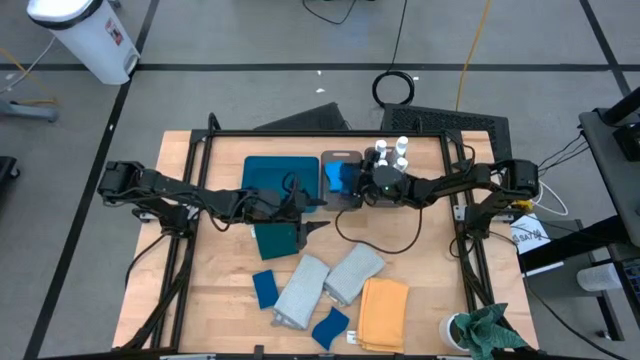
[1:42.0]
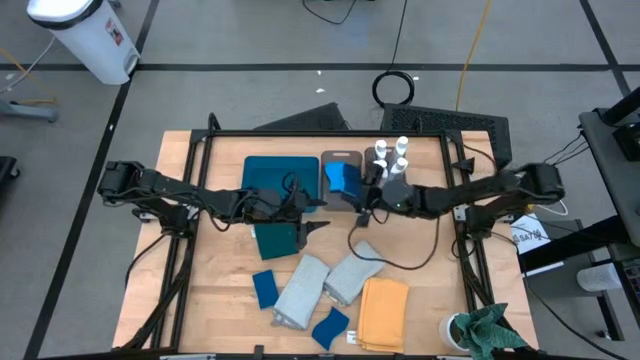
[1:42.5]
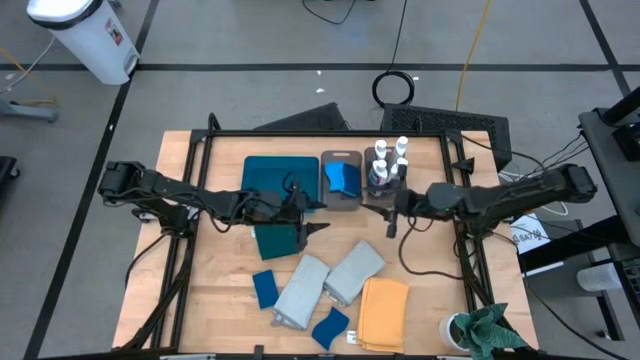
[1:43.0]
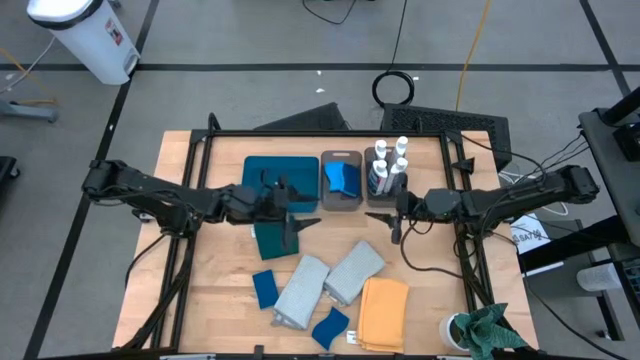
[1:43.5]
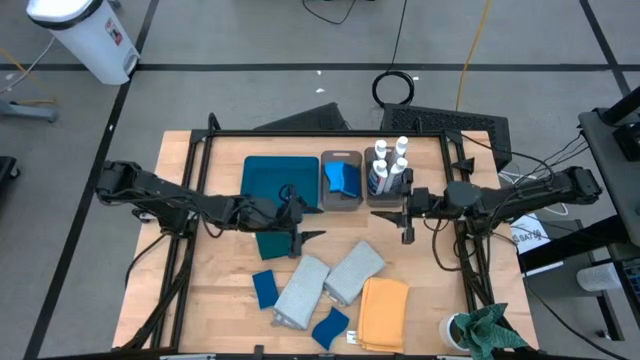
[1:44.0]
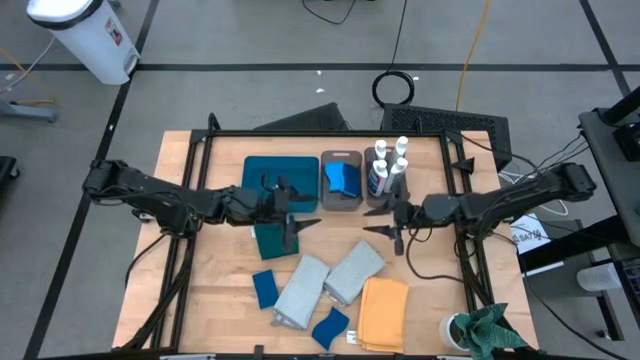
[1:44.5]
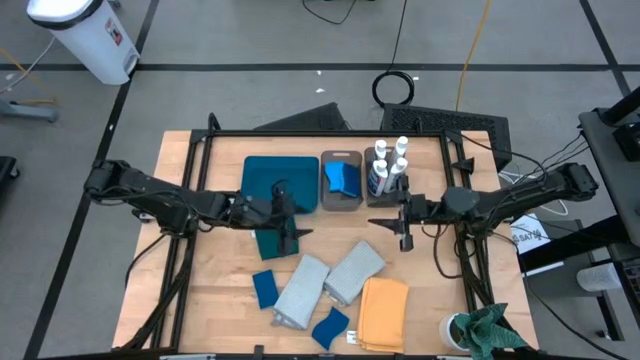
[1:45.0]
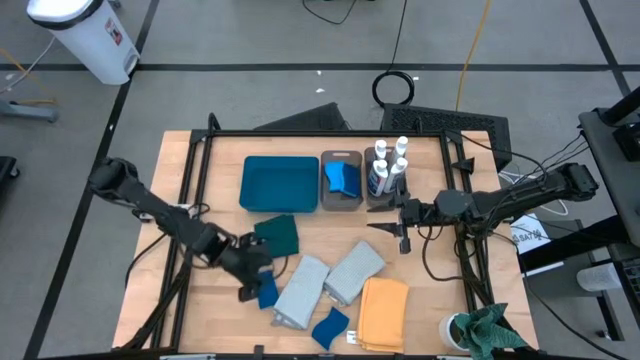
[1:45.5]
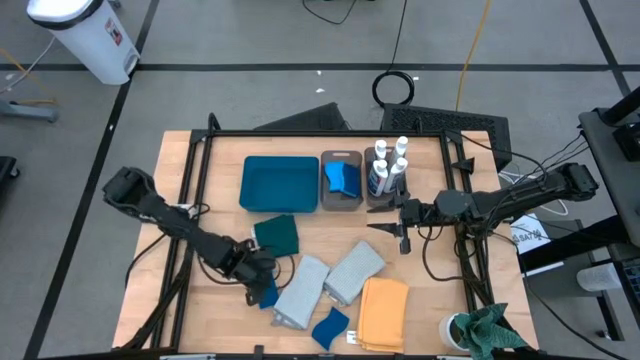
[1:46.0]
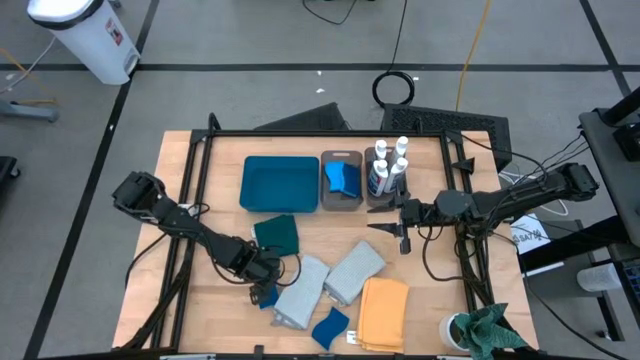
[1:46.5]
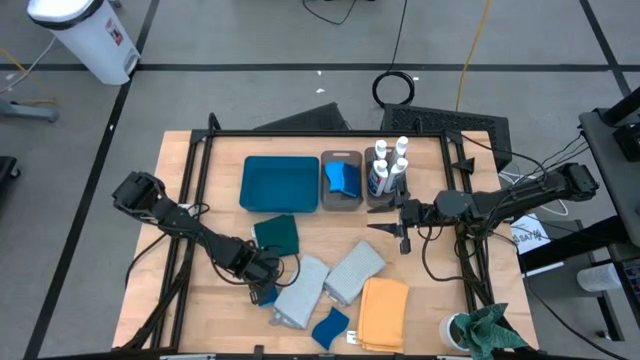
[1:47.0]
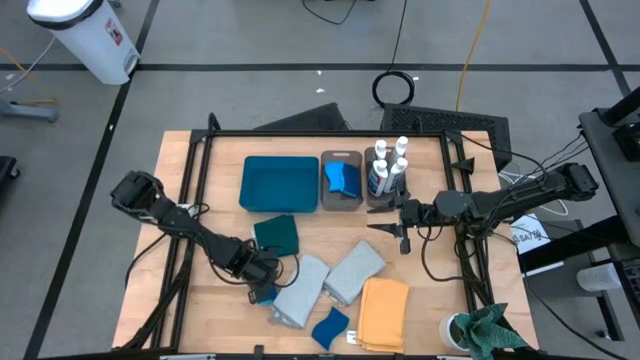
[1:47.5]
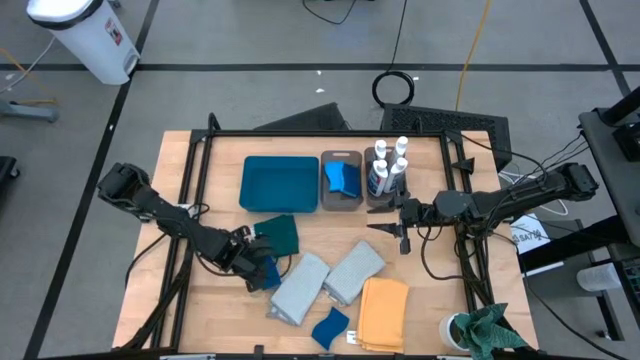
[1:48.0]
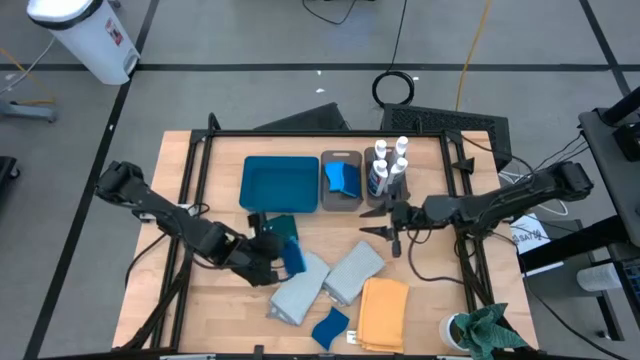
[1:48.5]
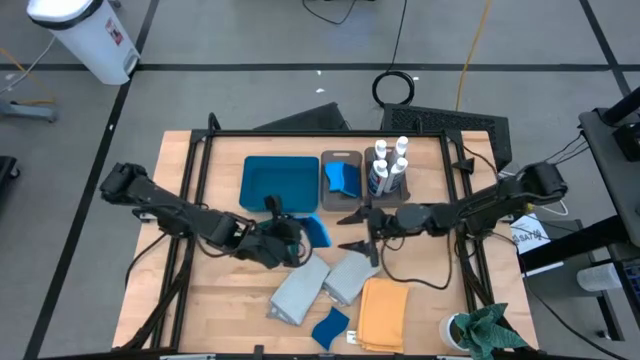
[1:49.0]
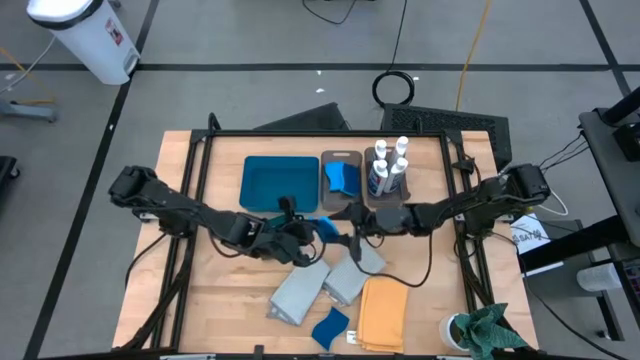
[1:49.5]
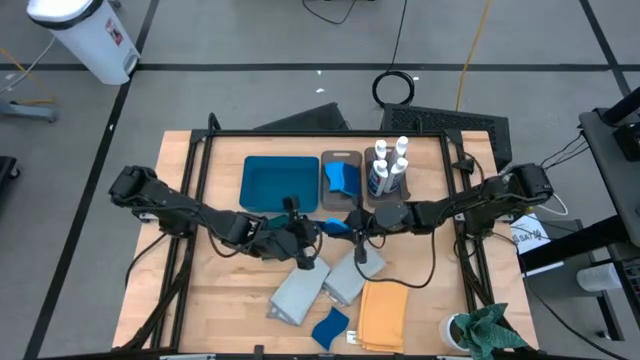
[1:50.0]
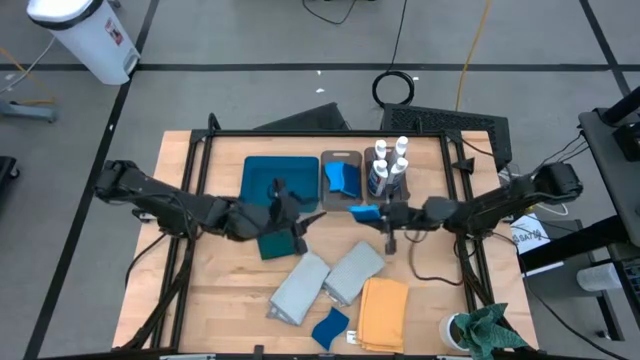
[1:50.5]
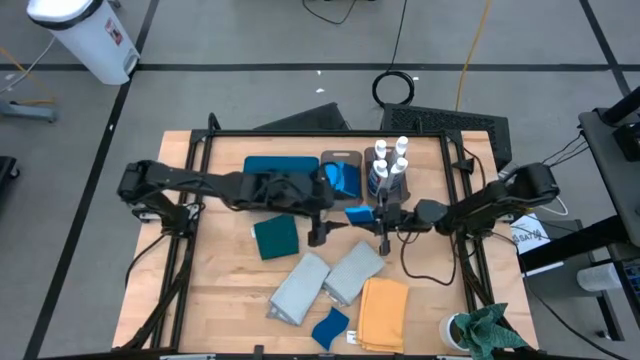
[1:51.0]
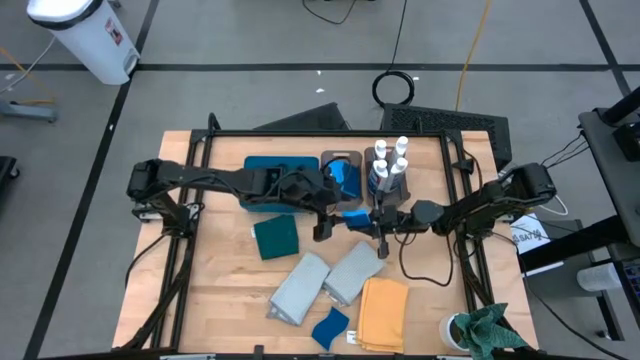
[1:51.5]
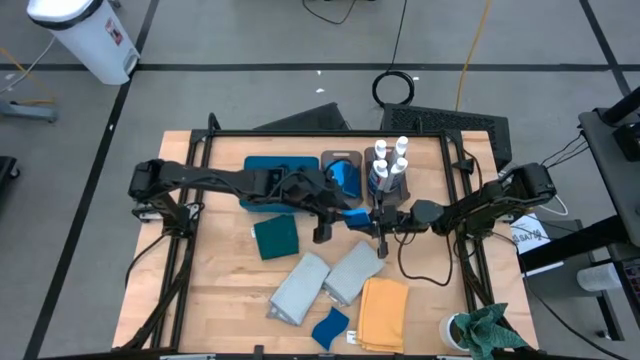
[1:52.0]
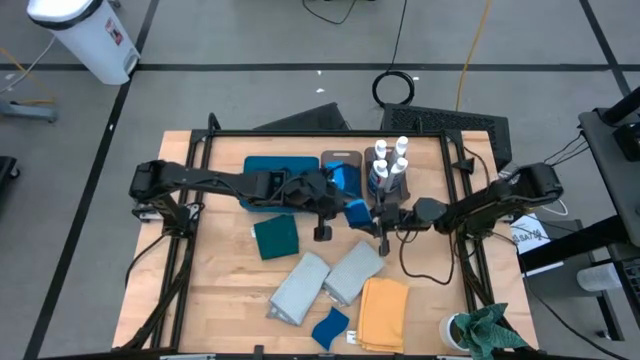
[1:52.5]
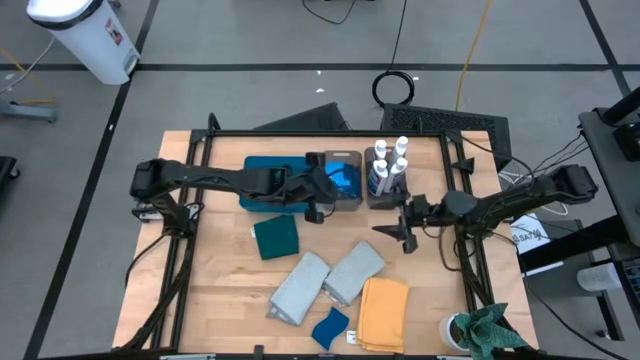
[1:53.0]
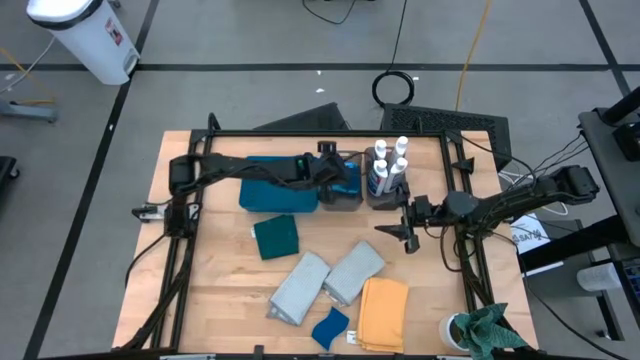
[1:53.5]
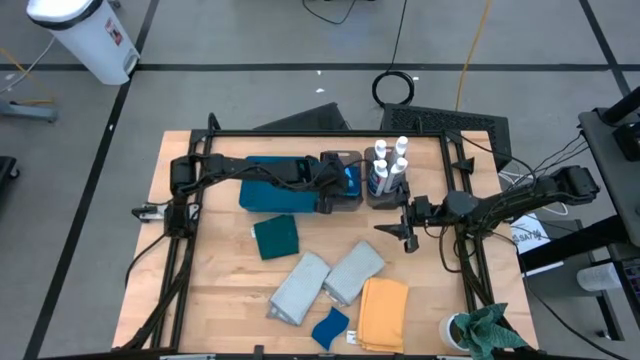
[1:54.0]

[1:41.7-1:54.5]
Task: Pick & Place Kitchen Items
Put the blue sponge into the left black bin

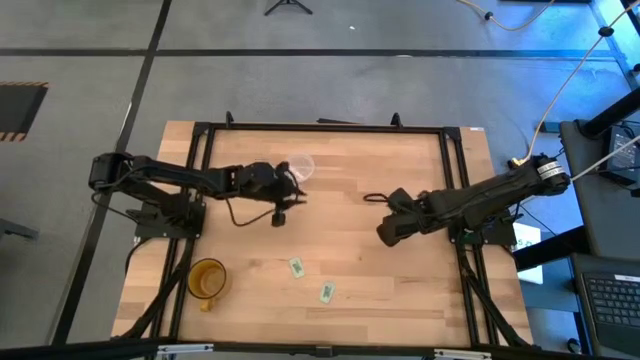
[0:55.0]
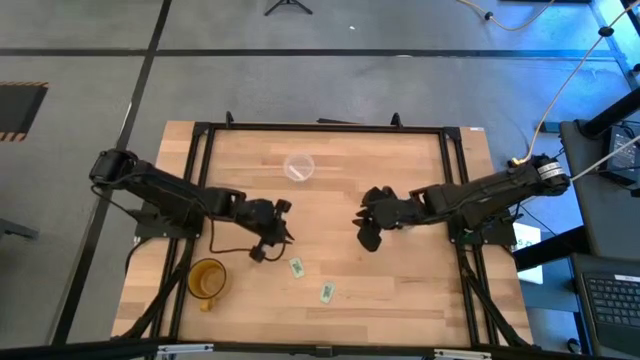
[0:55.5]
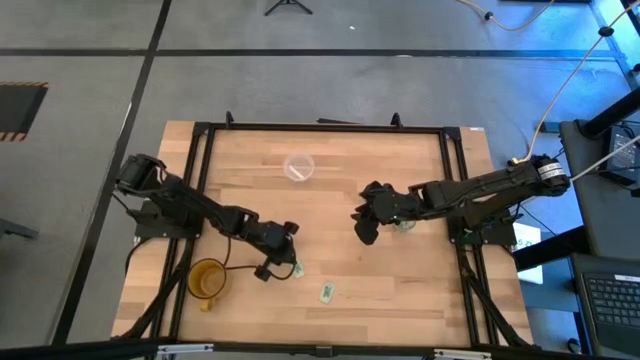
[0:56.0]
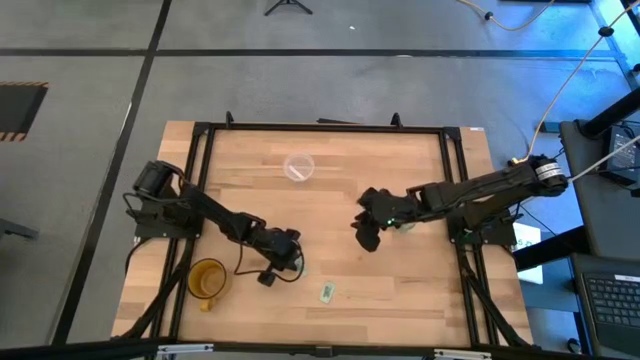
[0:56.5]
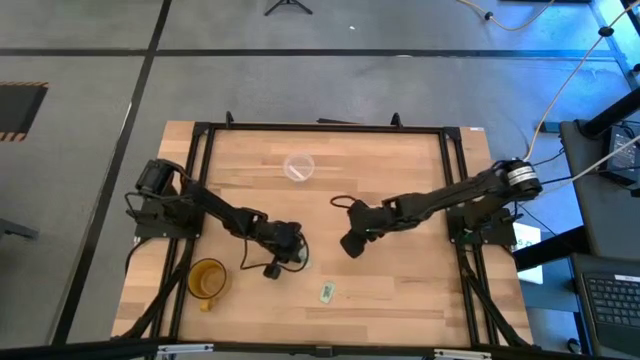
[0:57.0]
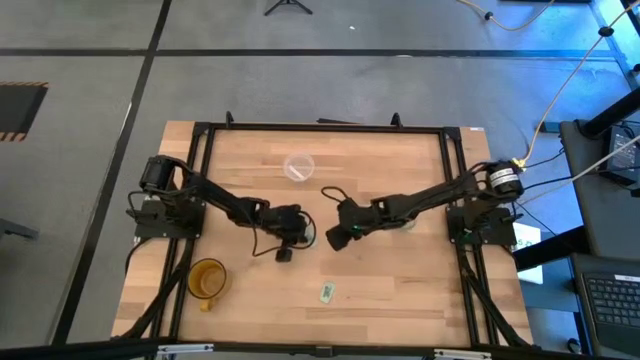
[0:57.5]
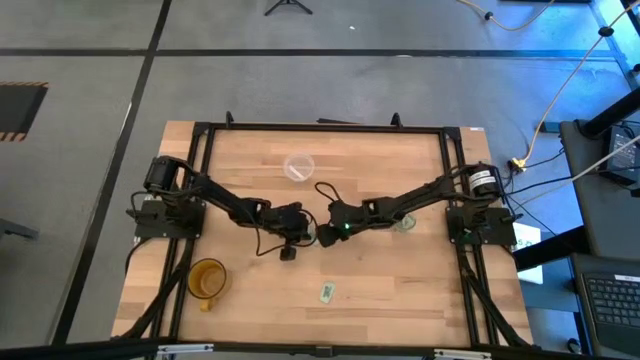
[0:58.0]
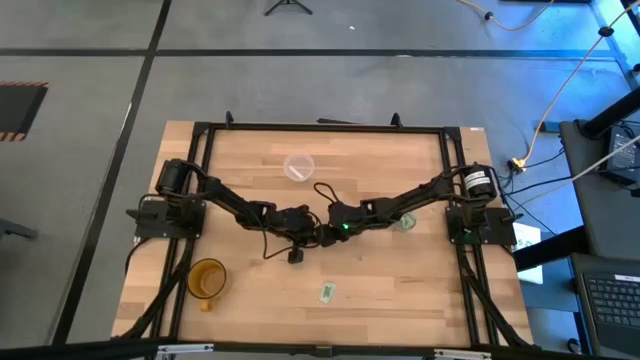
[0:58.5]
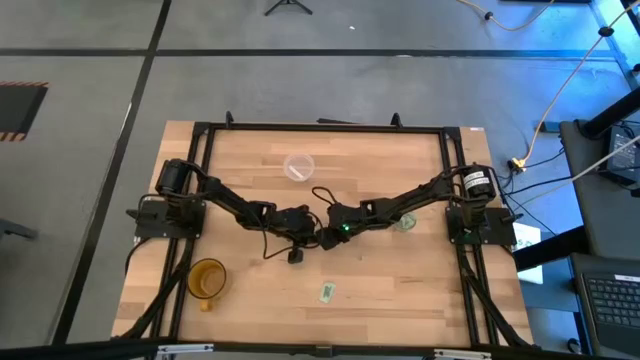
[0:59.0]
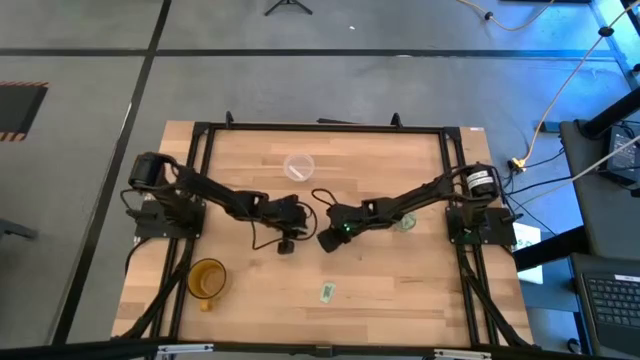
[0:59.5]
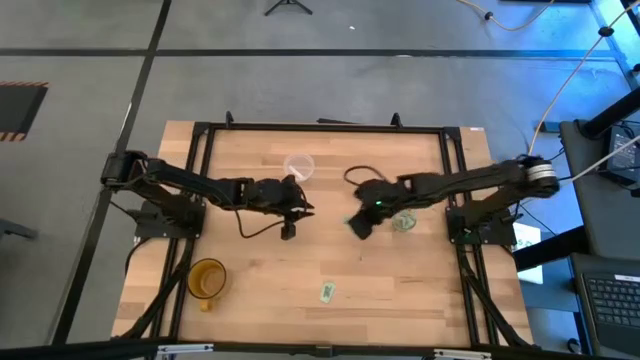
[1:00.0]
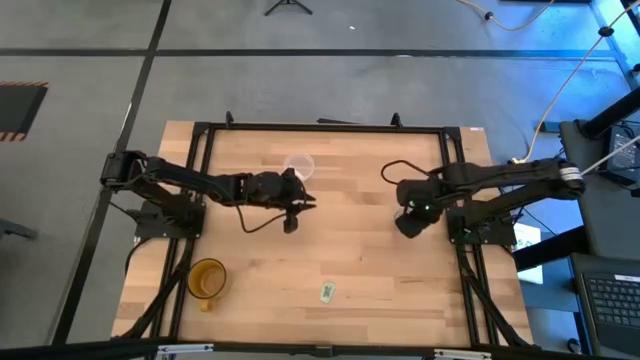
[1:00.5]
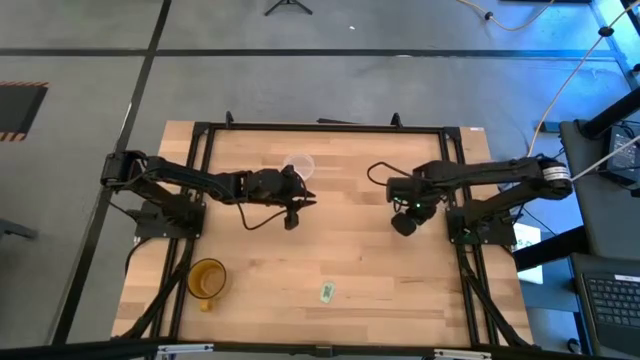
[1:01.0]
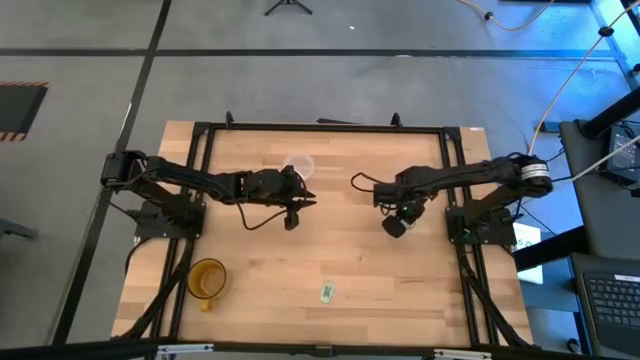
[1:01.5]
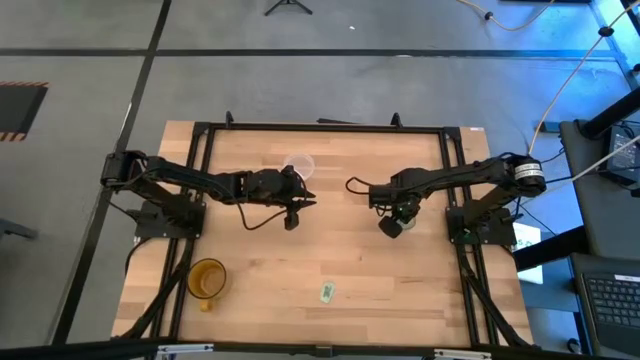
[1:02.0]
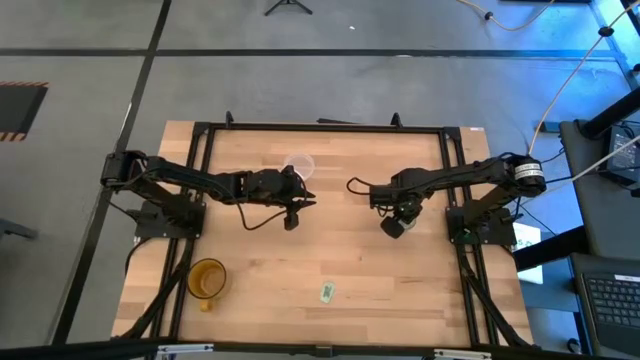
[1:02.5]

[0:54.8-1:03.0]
Task: Pick and place Stevia / Truvia into bins
Put the stevia packet into the transparent container
